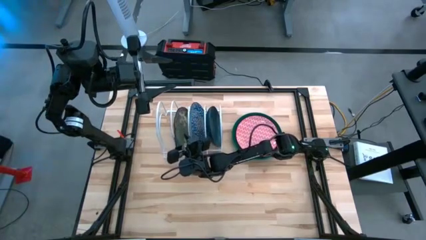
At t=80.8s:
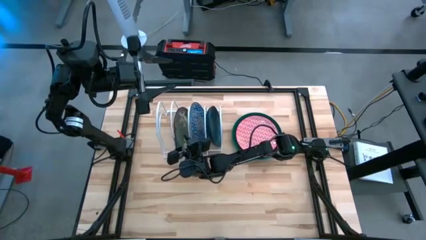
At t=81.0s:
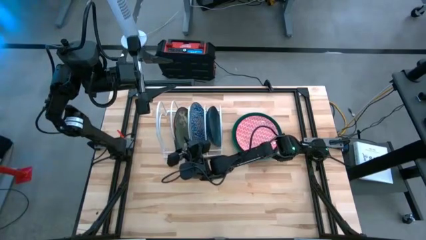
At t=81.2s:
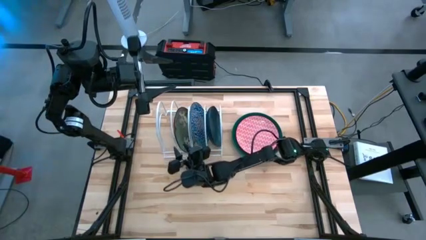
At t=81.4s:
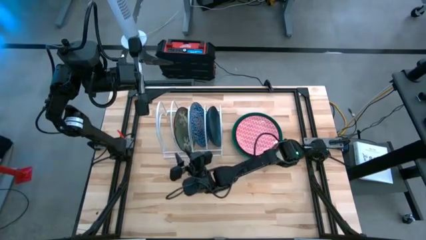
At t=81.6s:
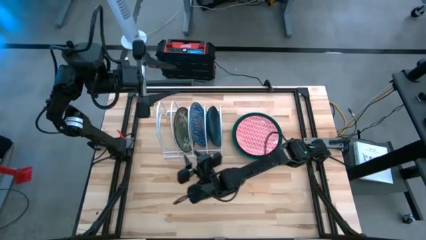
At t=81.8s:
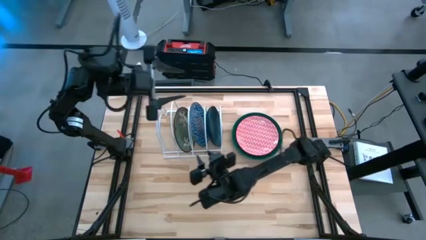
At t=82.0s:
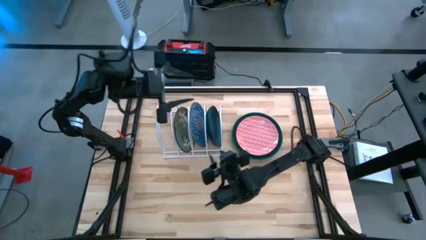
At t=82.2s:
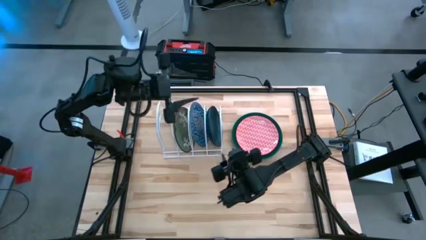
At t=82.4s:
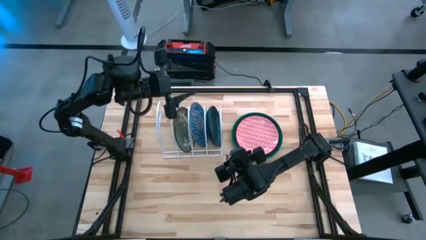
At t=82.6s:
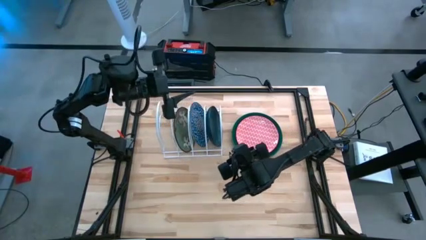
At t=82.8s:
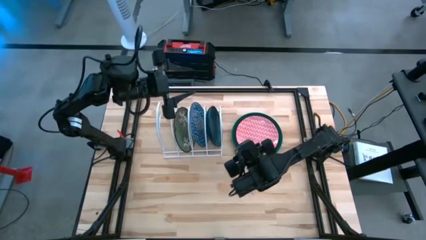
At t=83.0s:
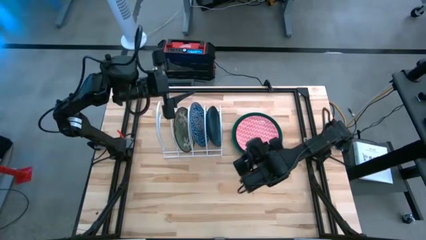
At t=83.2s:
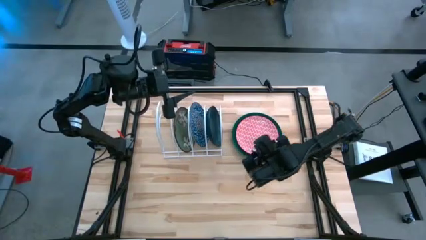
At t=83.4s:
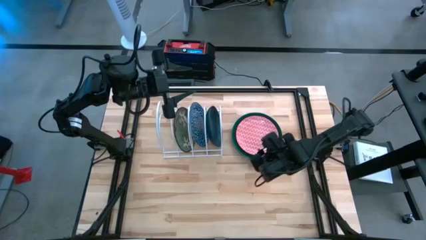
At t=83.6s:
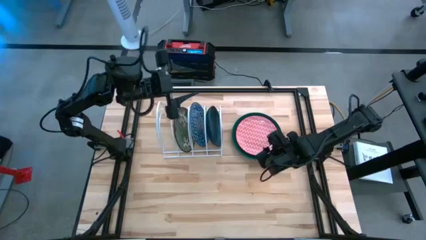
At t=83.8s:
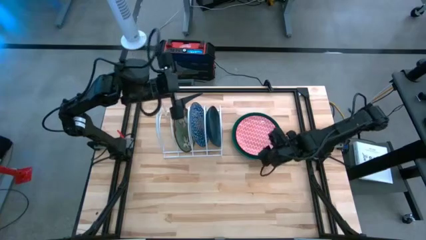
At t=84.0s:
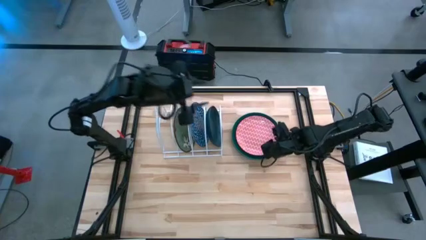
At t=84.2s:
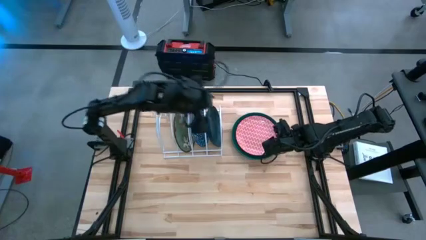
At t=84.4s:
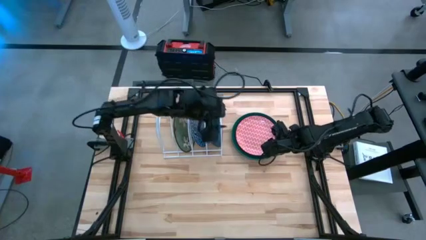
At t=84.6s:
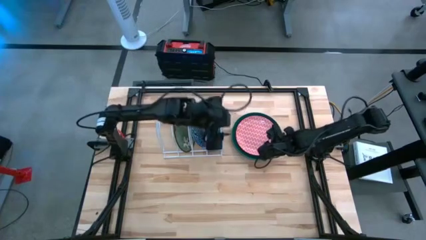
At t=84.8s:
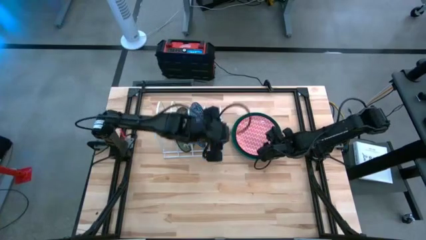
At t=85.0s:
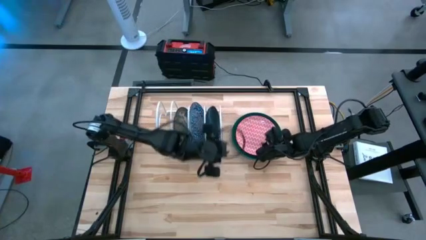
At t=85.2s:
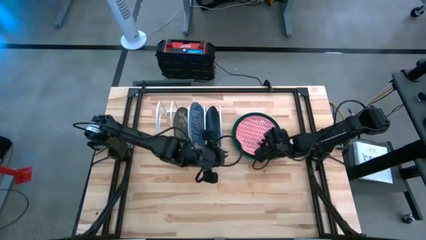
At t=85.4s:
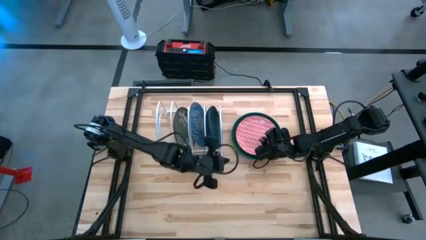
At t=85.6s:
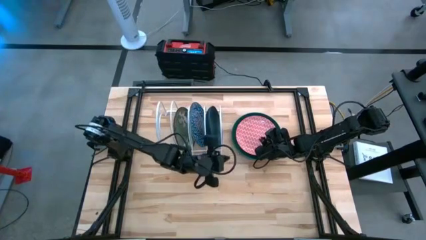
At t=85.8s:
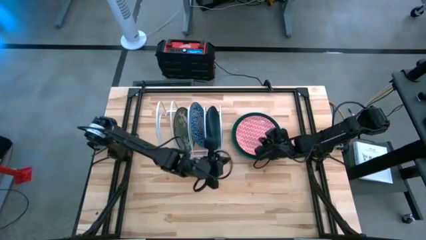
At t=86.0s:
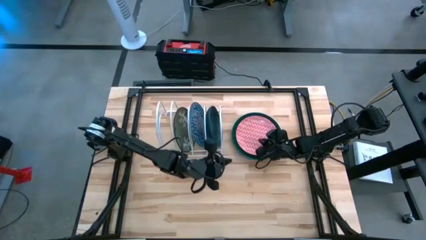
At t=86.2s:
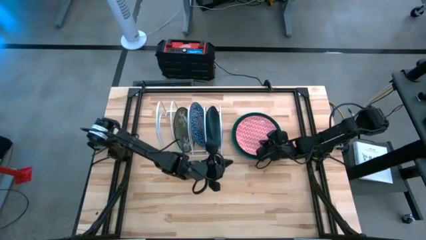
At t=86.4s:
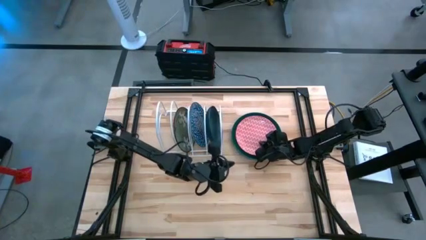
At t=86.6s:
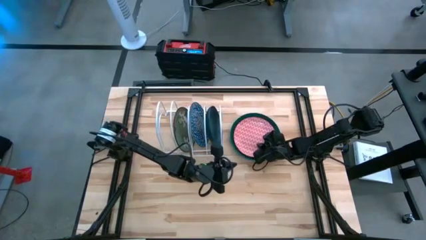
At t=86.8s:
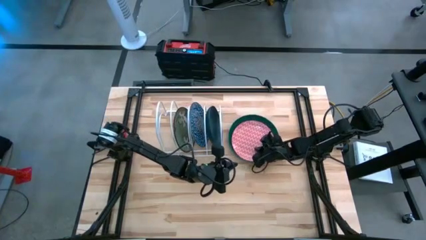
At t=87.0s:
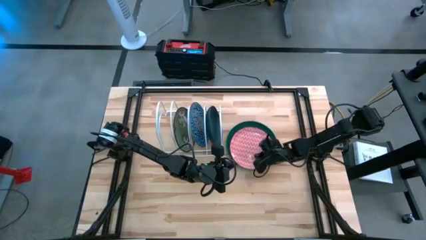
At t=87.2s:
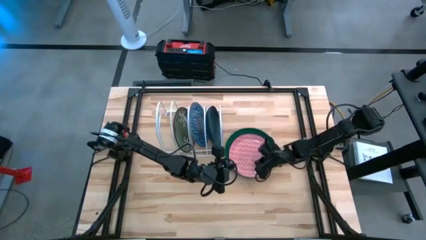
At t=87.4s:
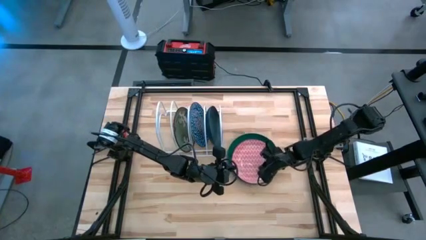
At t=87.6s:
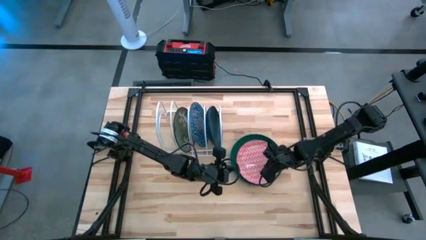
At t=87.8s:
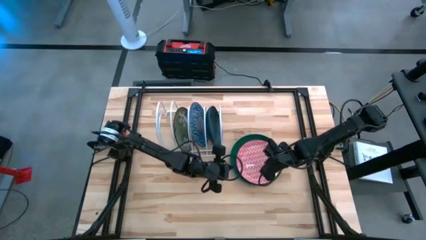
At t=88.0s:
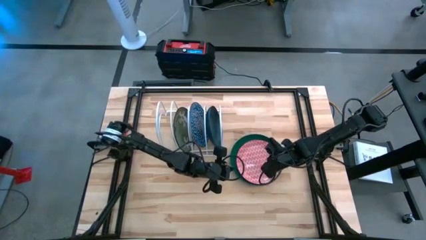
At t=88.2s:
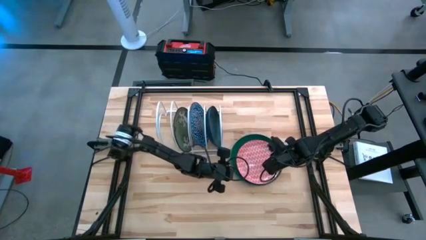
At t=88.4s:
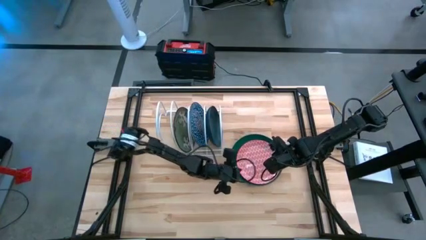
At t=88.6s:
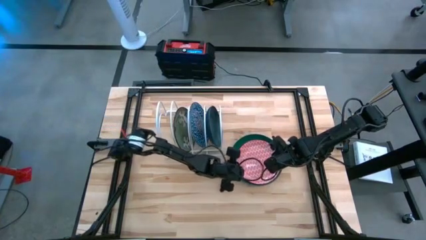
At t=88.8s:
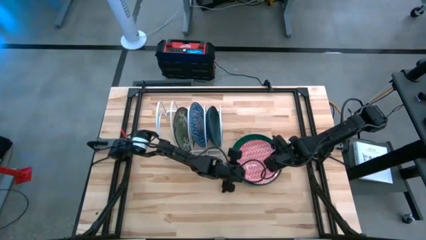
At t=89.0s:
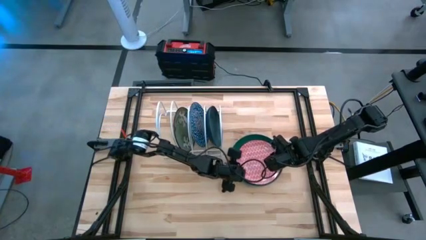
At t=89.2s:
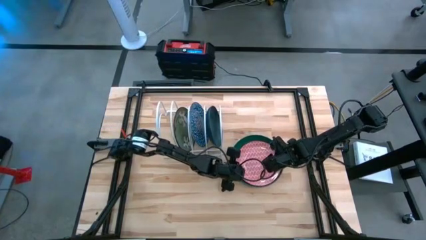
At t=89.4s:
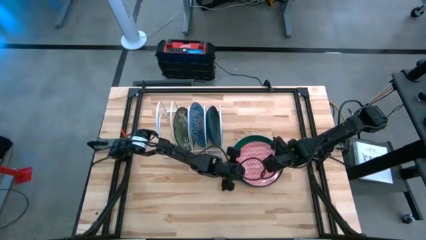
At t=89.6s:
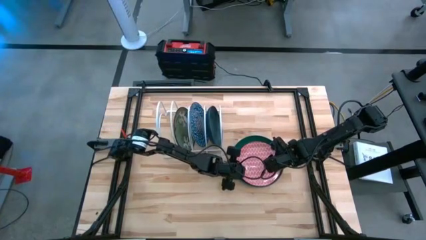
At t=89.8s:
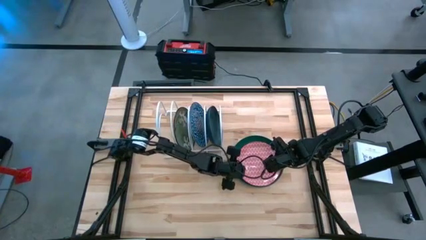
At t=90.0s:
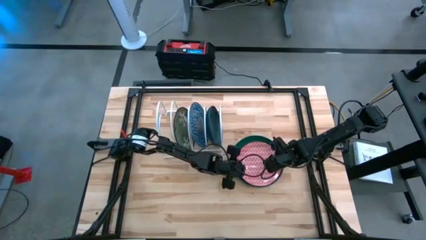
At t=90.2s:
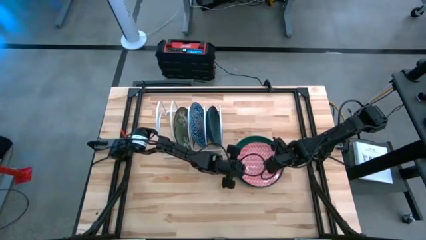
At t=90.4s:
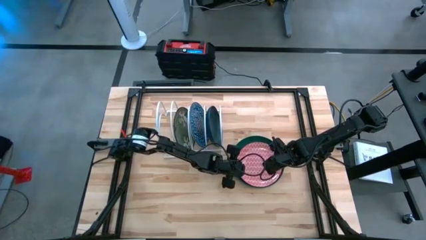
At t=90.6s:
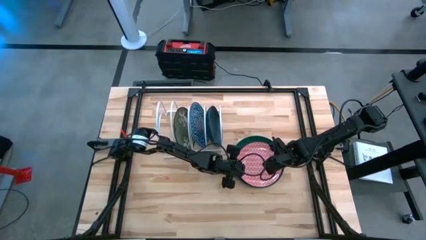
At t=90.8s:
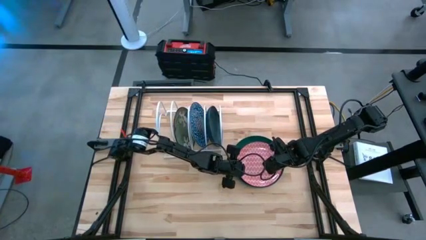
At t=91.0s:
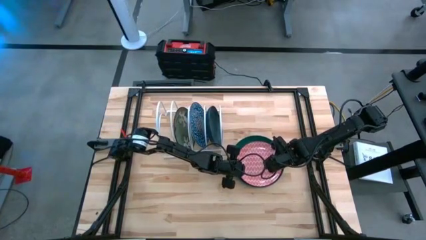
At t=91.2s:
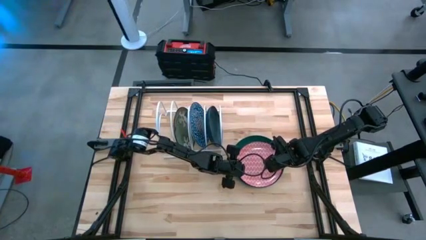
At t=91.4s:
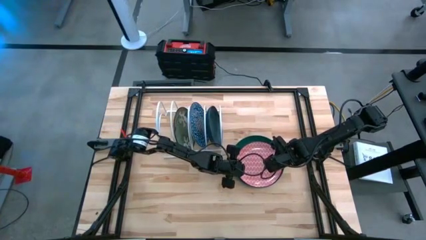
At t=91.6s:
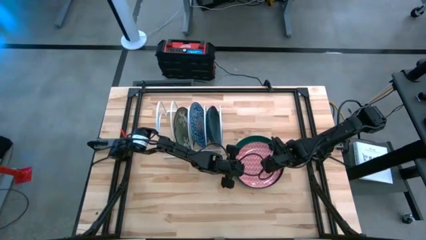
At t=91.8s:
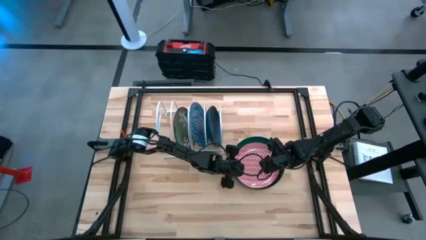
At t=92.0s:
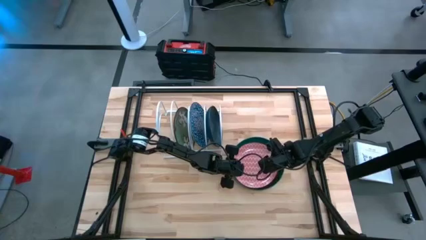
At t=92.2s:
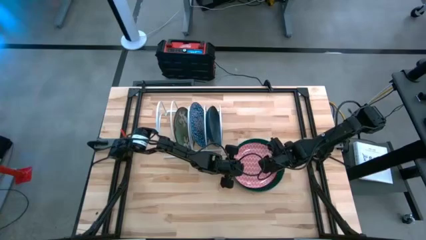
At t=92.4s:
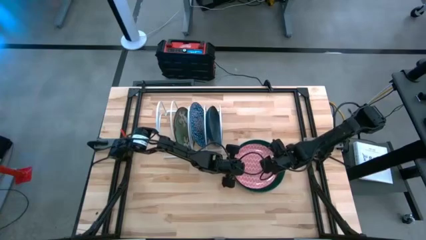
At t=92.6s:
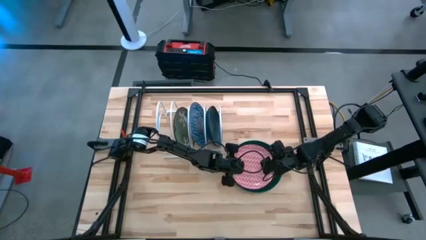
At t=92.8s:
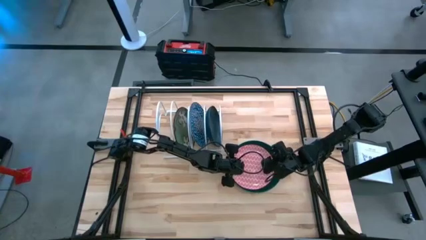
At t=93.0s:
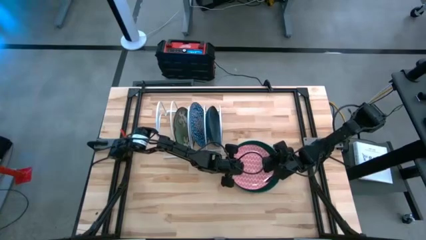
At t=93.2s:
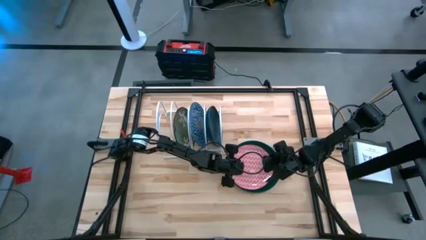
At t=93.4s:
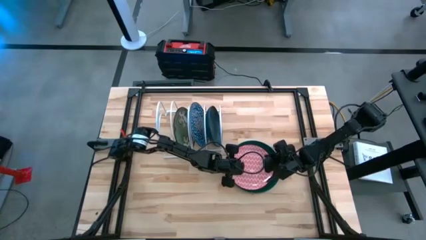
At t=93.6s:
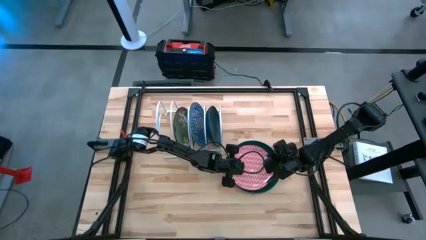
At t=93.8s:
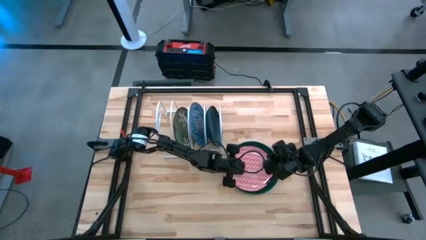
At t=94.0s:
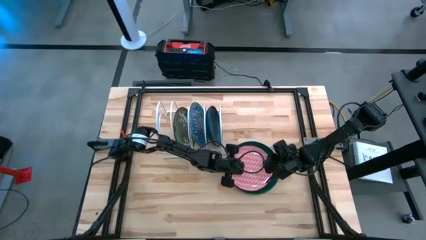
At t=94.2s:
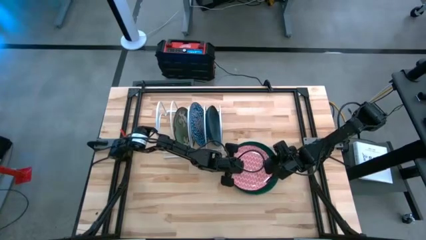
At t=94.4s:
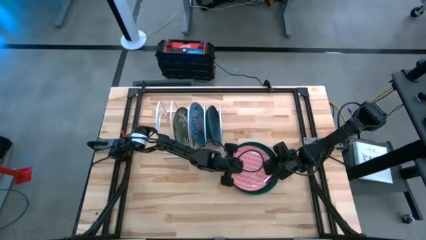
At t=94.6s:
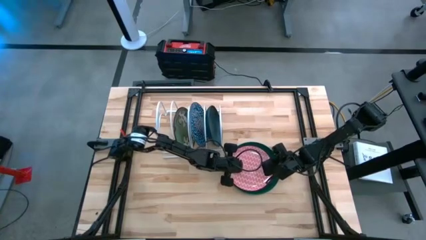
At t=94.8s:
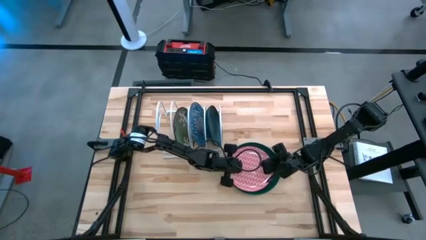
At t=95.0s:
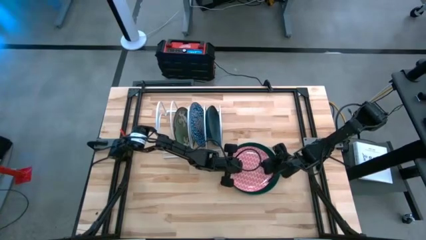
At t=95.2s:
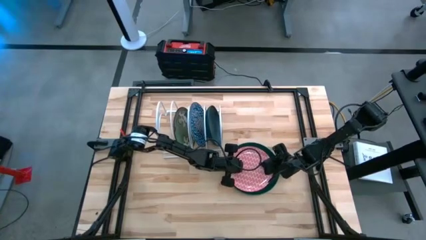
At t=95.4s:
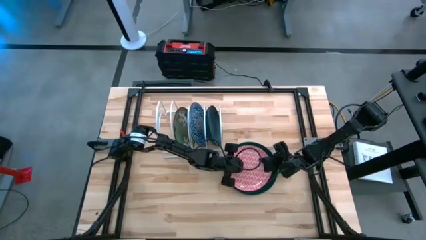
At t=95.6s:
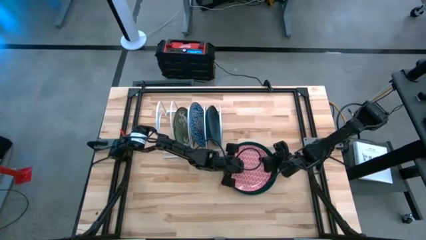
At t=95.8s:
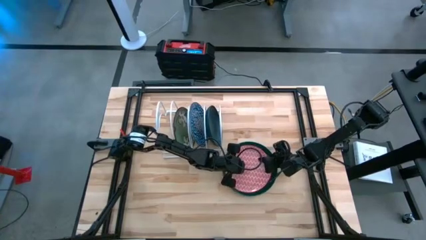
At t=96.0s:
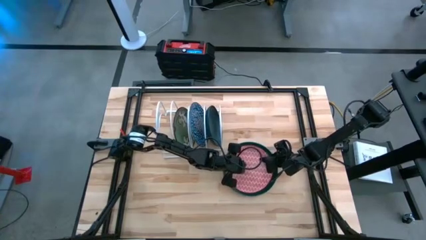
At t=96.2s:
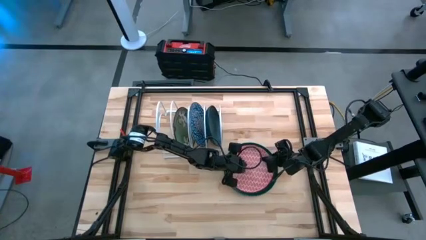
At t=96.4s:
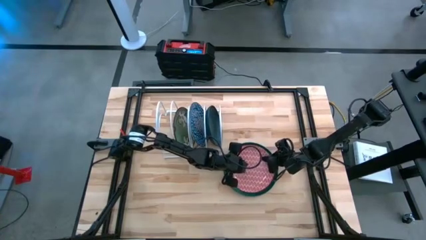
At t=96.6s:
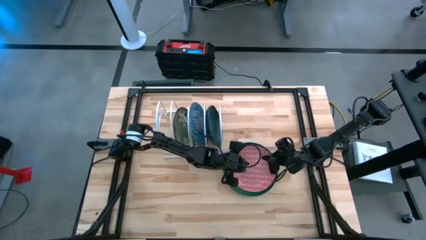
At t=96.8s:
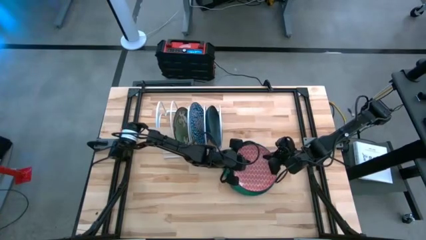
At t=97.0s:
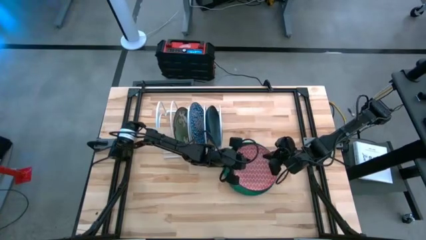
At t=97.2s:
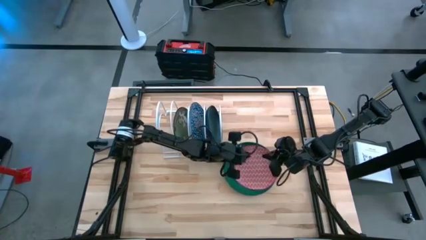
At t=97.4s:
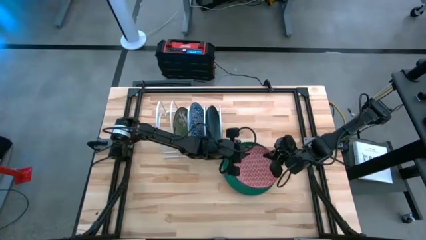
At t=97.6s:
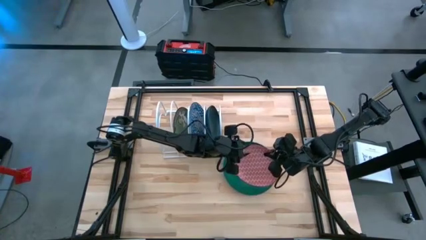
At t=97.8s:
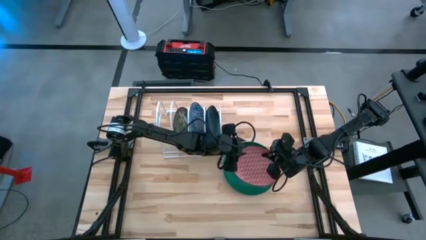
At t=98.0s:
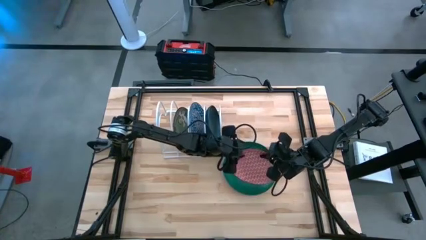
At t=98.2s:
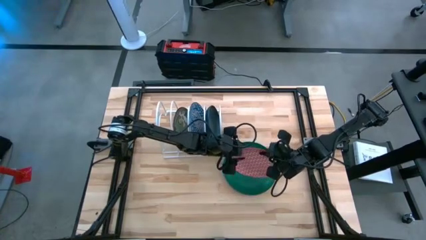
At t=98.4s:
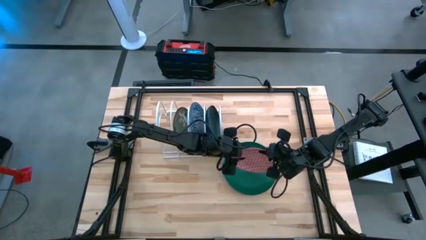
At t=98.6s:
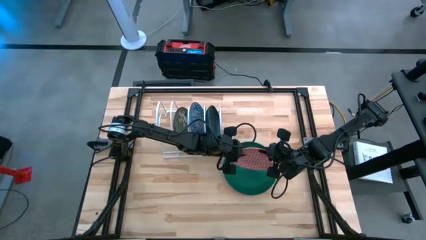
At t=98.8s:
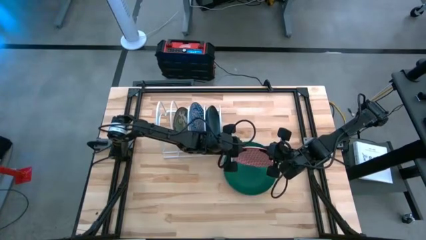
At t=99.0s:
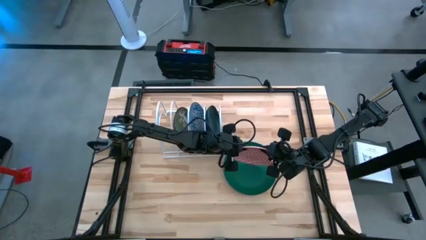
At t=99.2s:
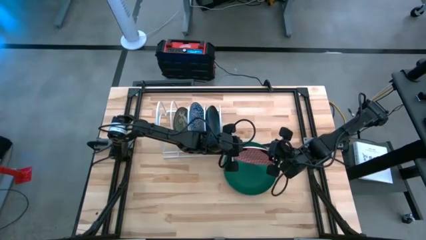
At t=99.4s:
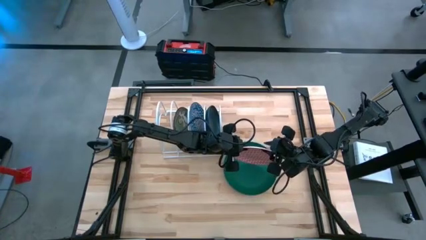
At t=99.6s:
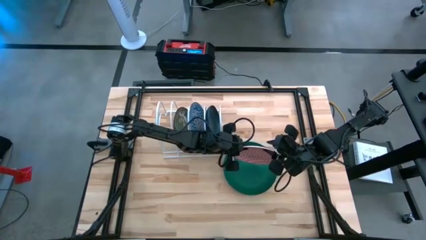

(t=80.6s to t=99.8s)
Task: Sort dishes
Put the orange patterned plate into the dish rack
